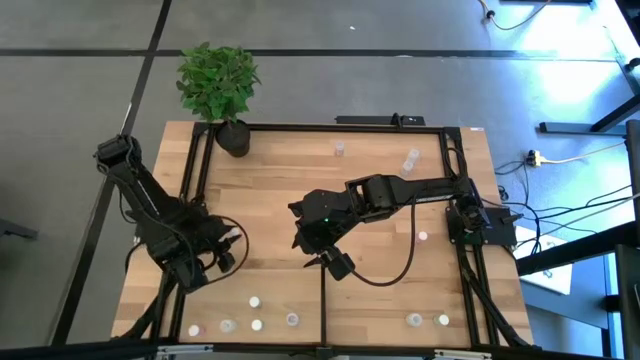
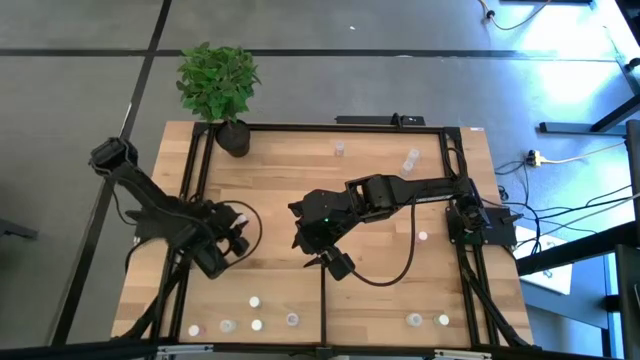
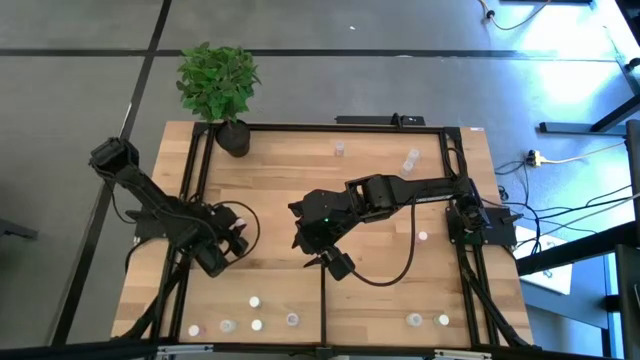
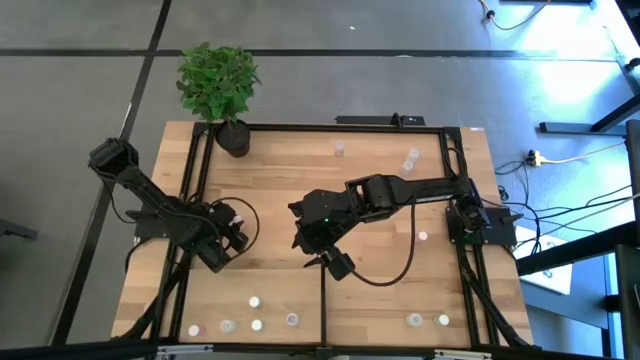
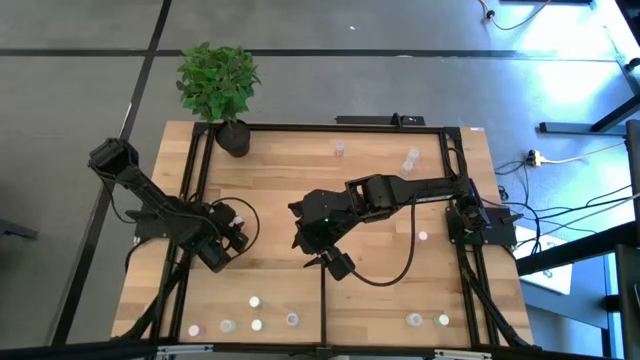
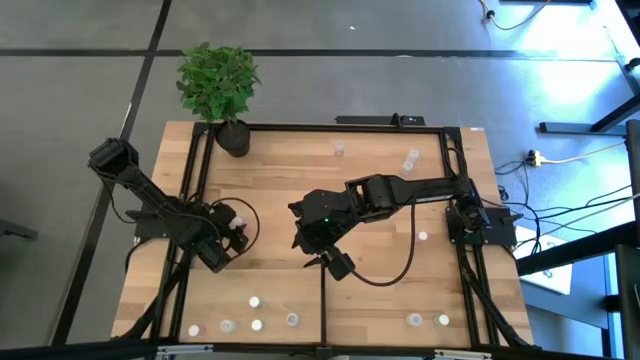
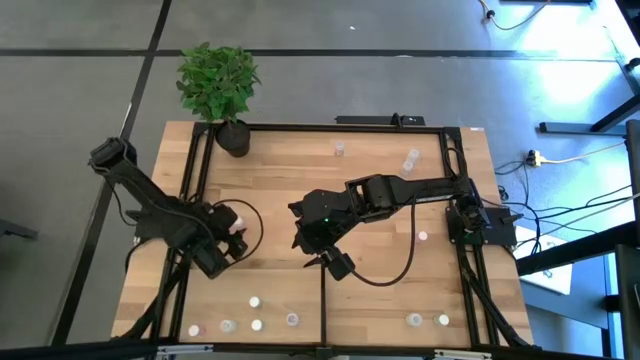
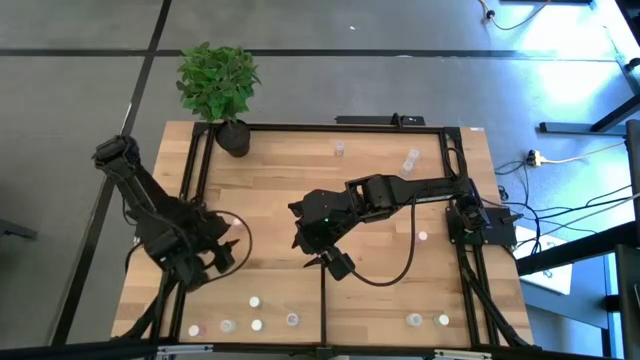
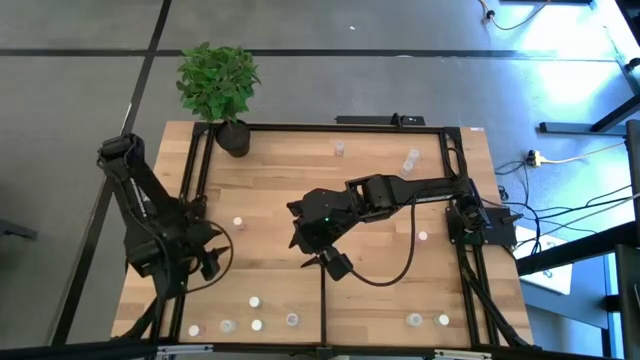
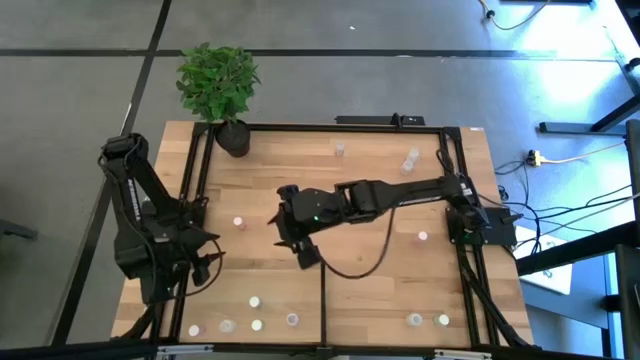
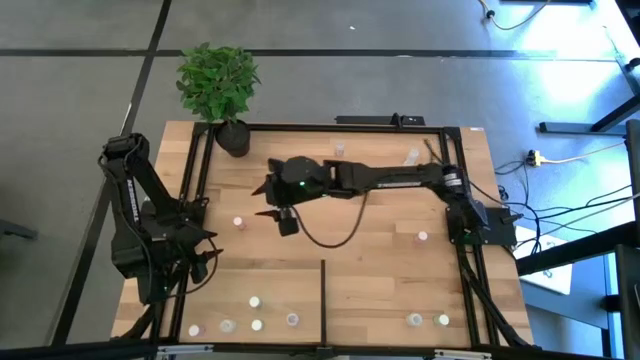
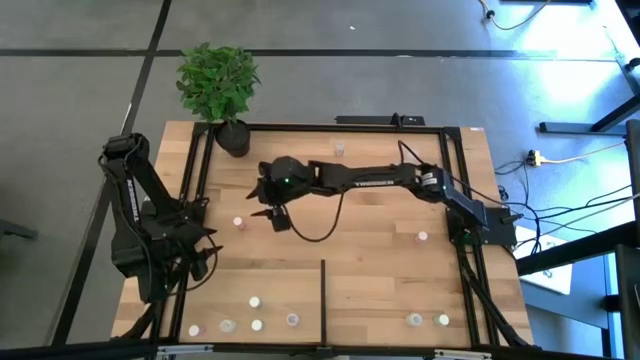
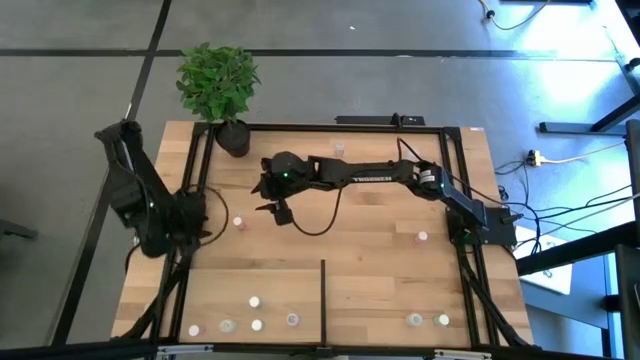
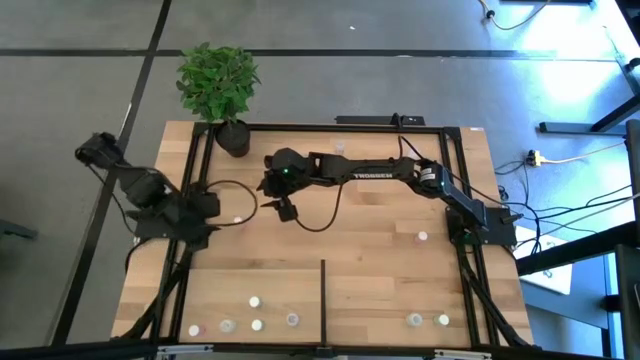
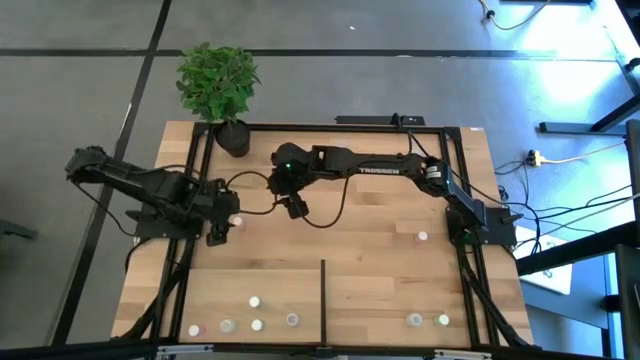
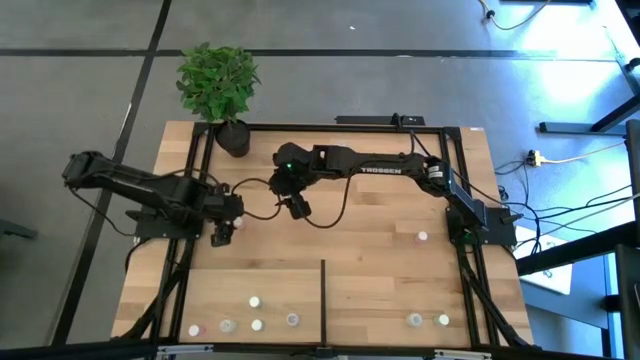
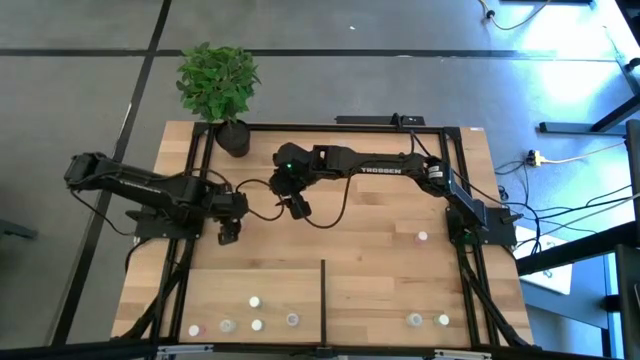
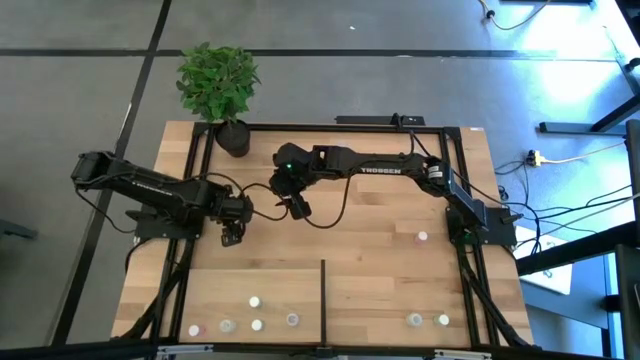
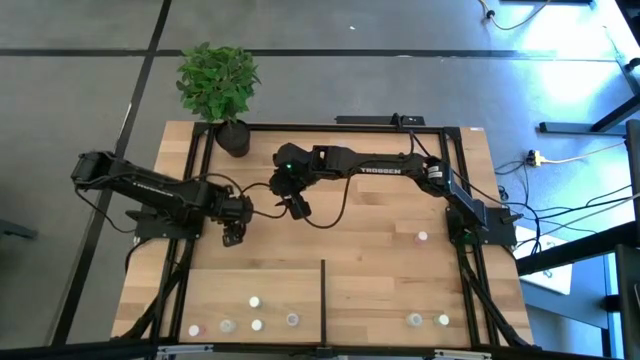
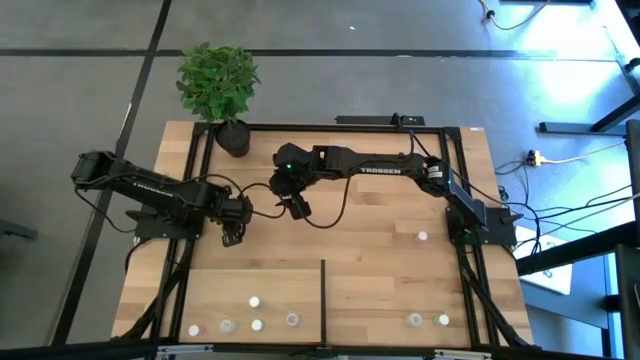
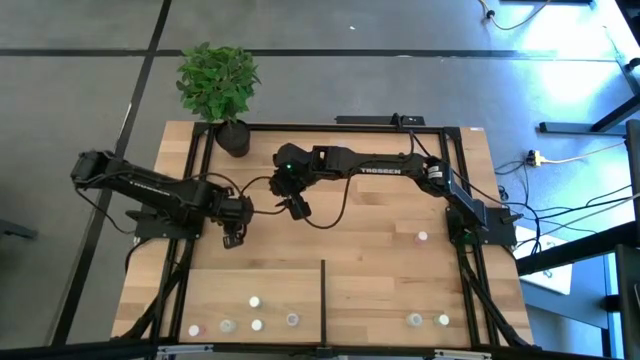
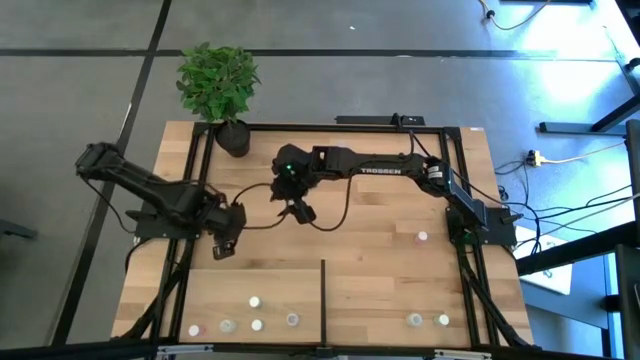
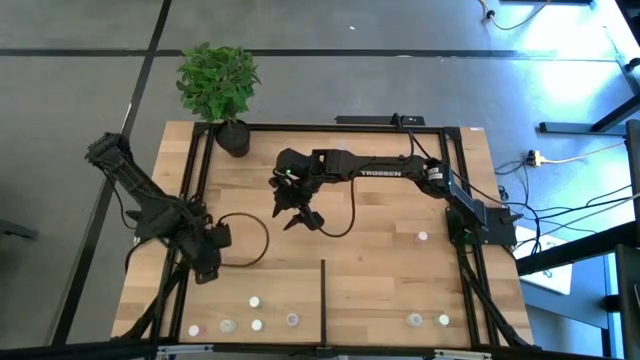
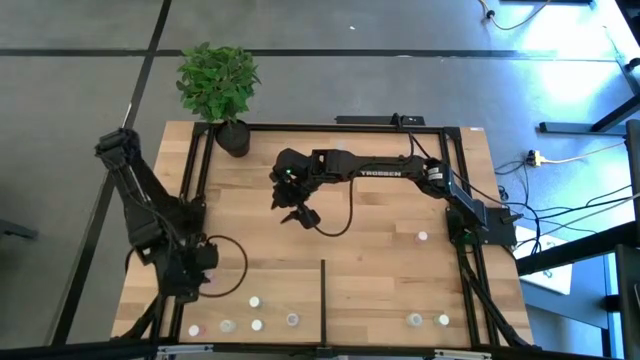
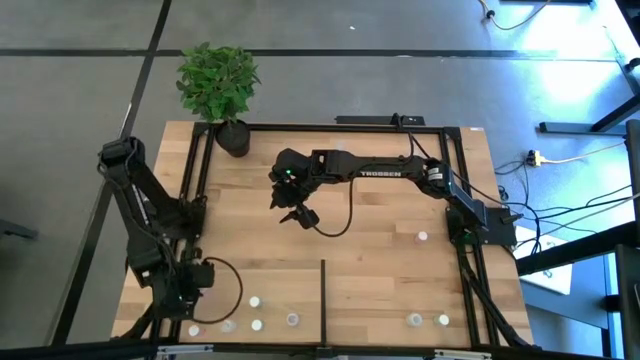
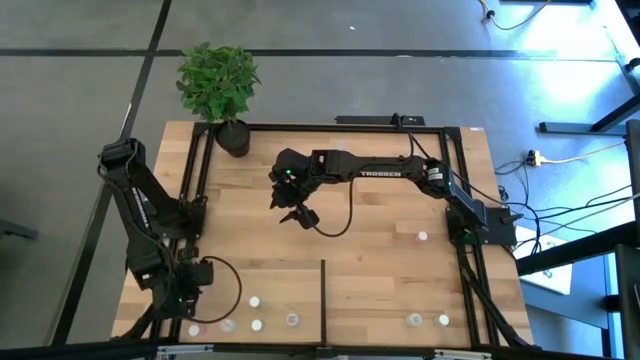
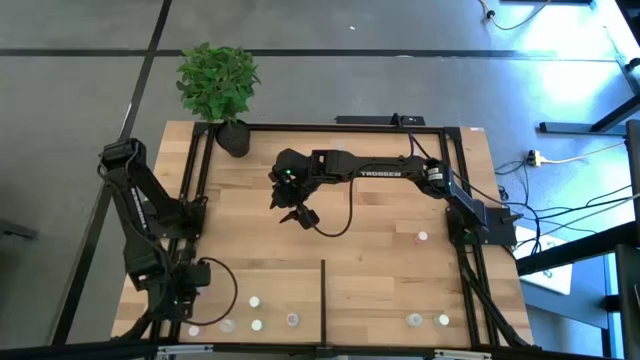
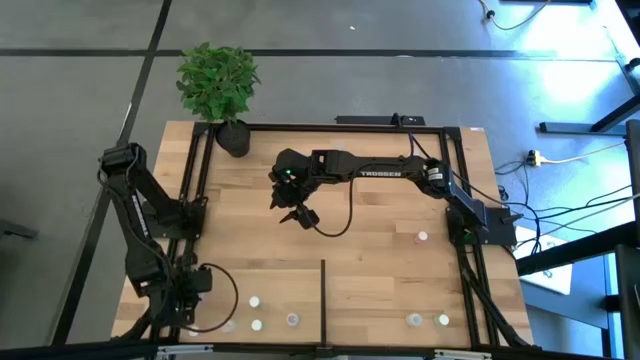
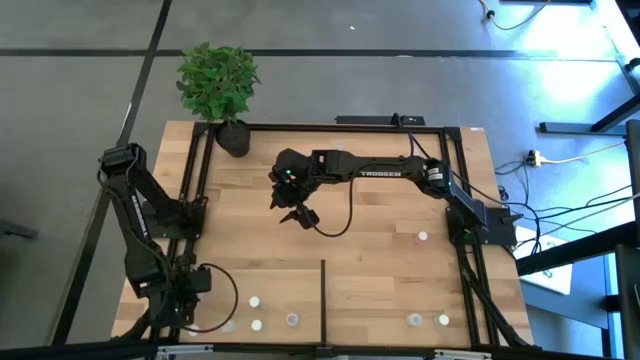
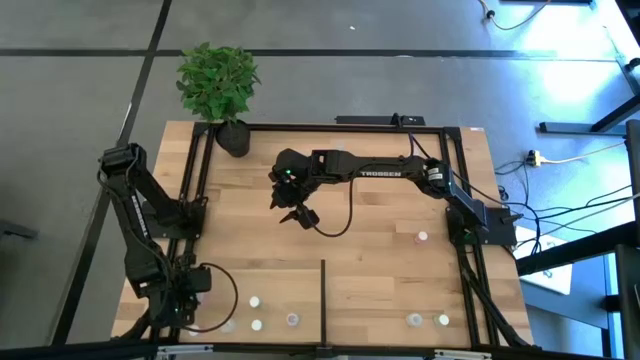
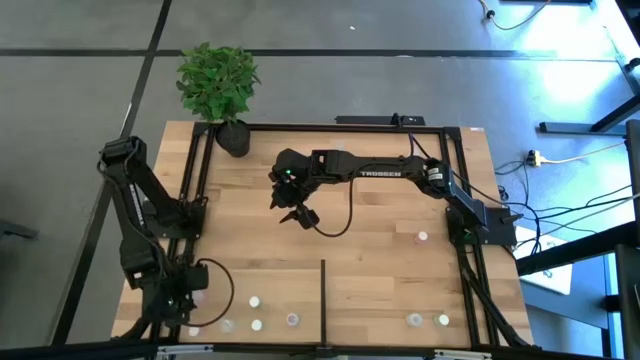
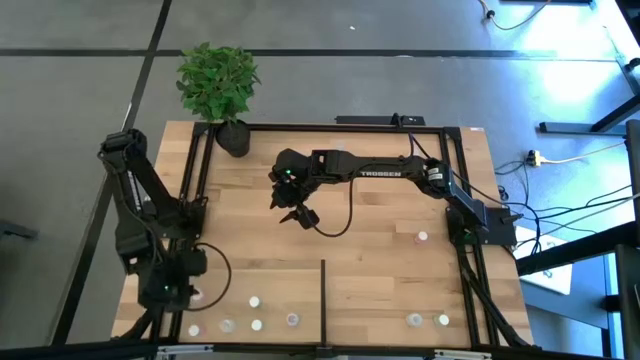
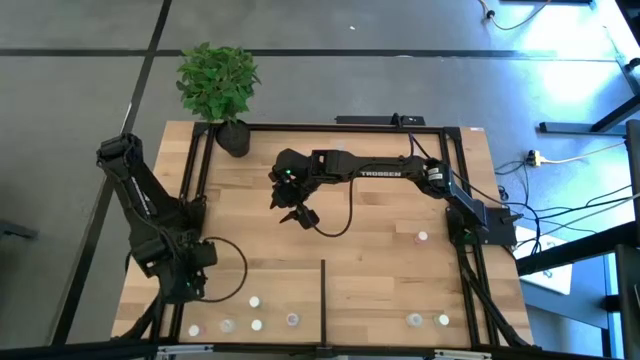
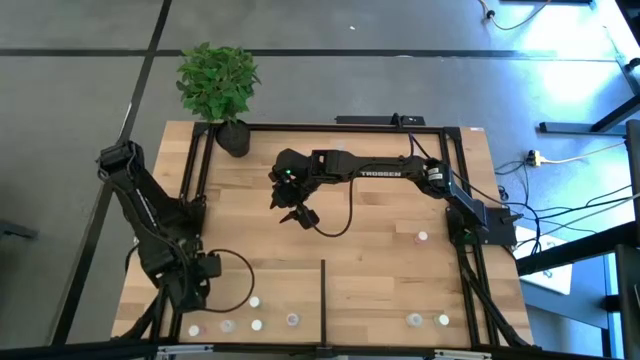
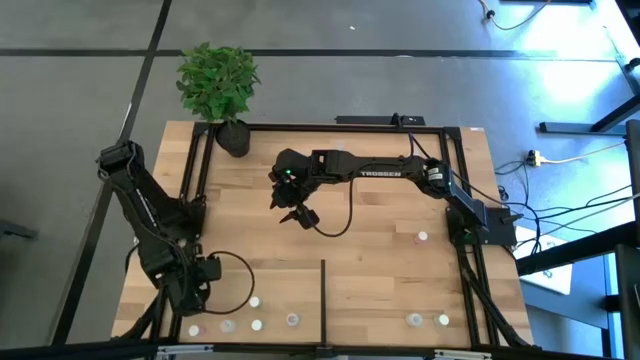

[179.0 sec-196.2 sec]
Task: Pick and place medicine bottles onto shelf by color
Put the bottom pink pill bottle on the shelf aligned with the other pink pill bottle

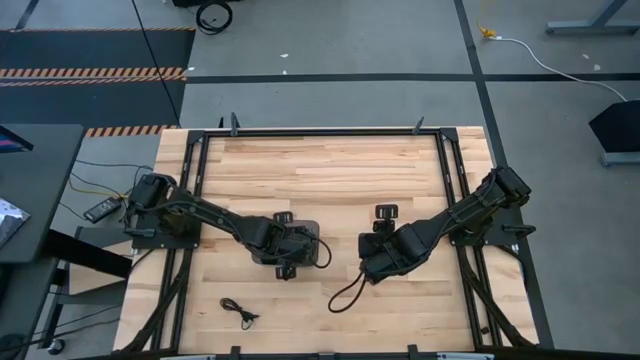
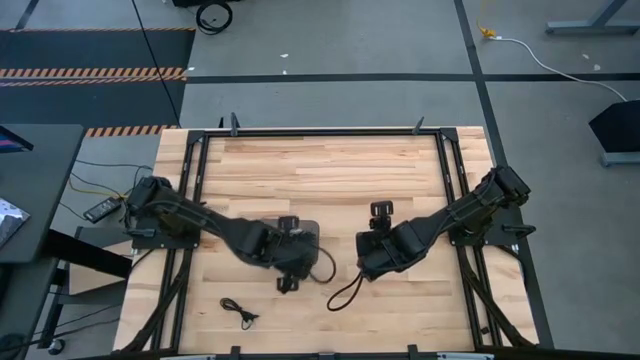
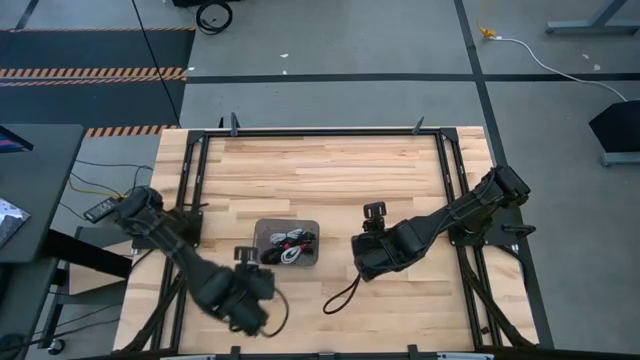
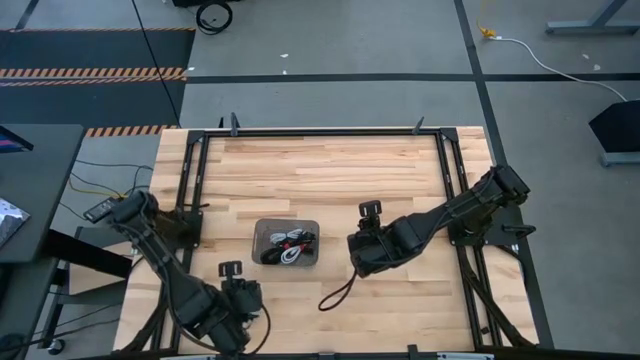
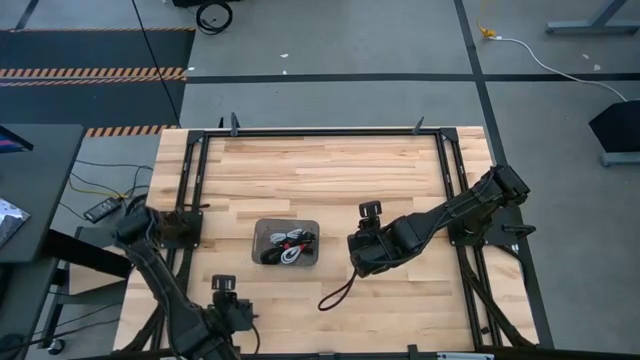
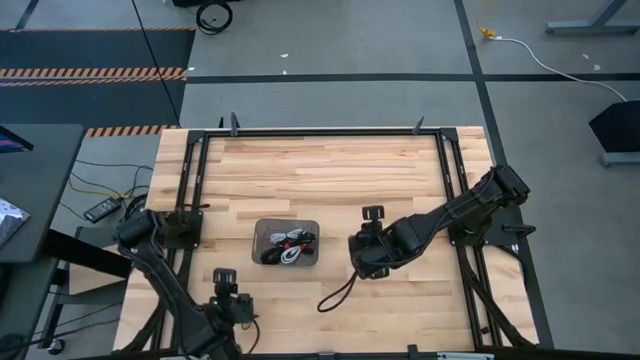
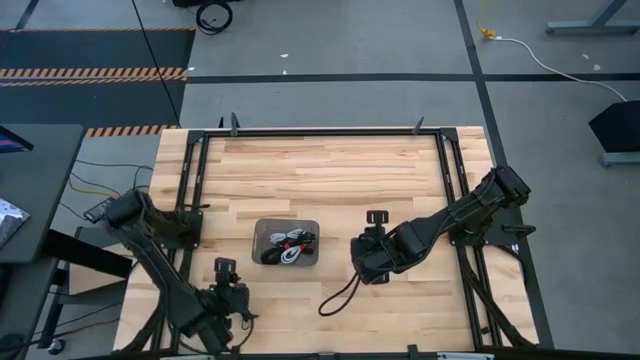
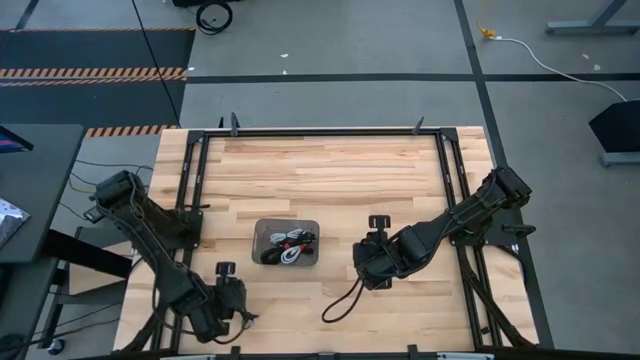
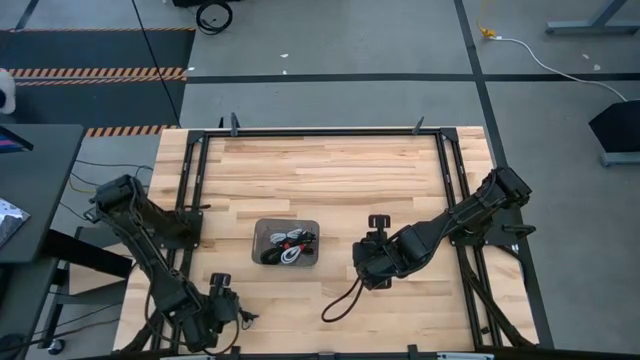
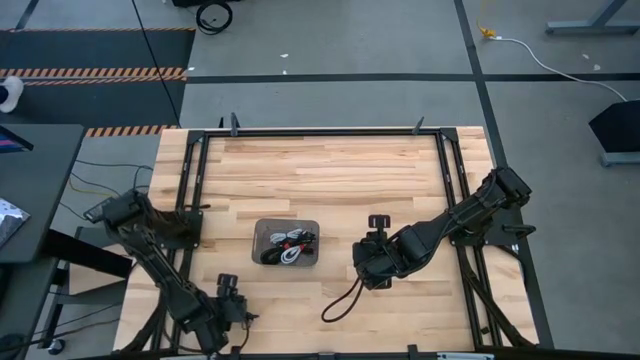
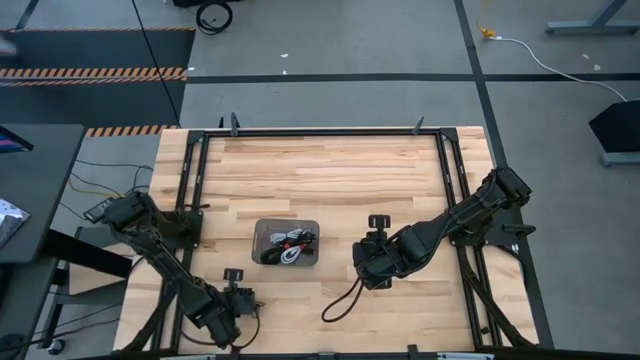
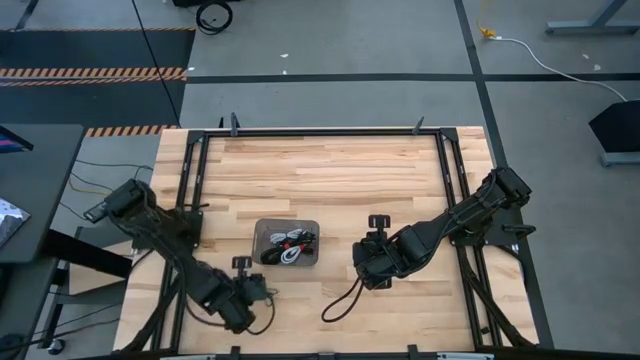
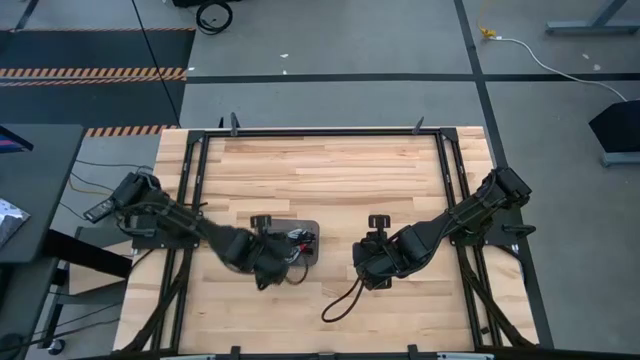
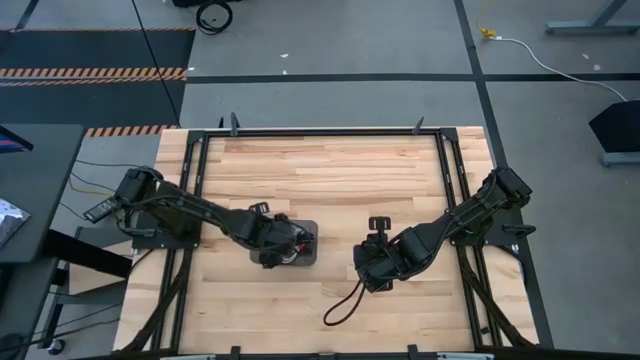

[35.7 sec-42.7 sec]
Task: Pick and place USB-C Cables
Put the black USB cable into the black bin
